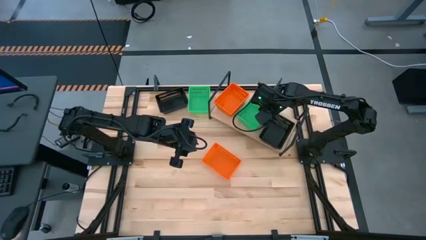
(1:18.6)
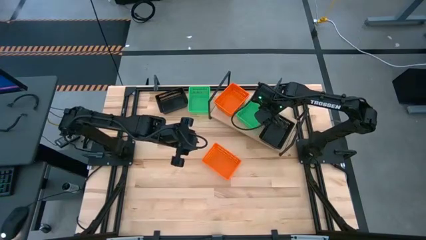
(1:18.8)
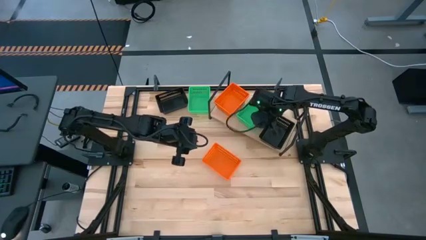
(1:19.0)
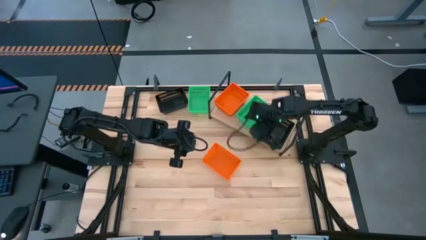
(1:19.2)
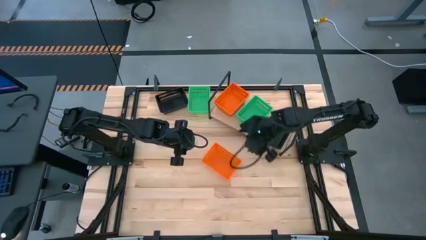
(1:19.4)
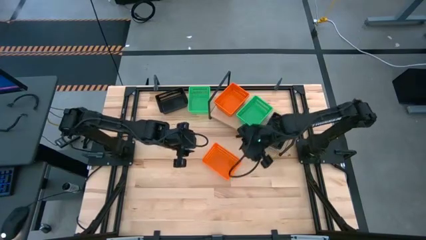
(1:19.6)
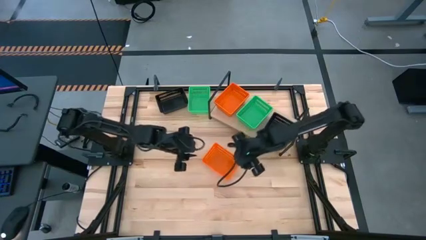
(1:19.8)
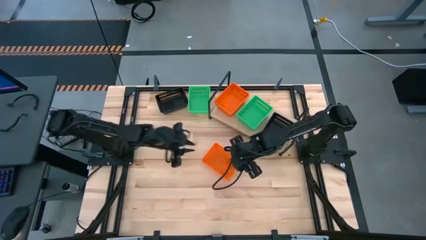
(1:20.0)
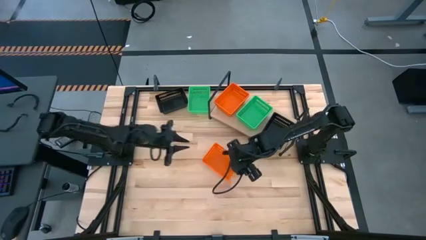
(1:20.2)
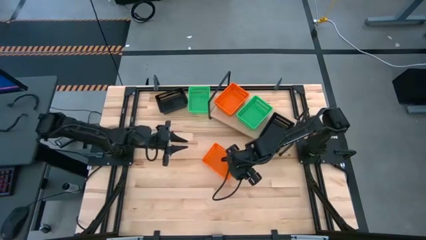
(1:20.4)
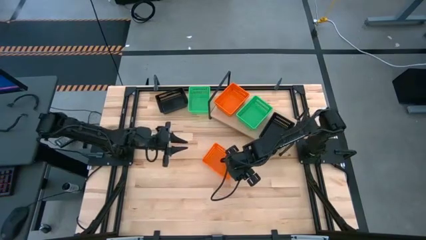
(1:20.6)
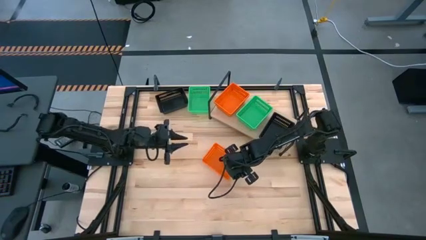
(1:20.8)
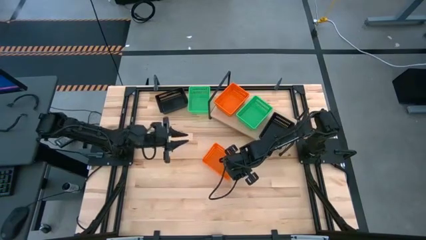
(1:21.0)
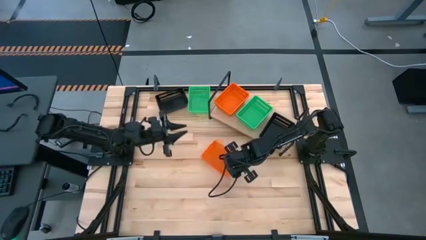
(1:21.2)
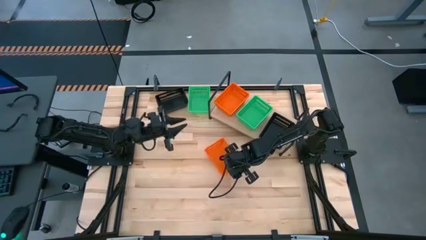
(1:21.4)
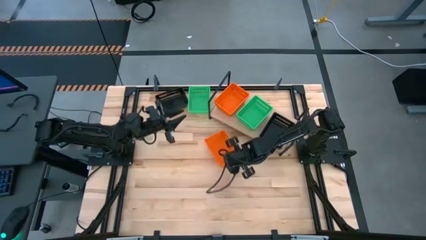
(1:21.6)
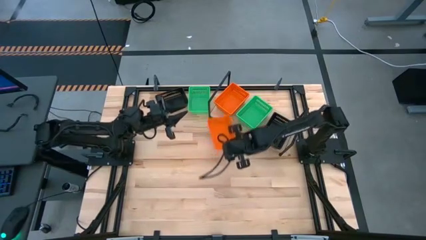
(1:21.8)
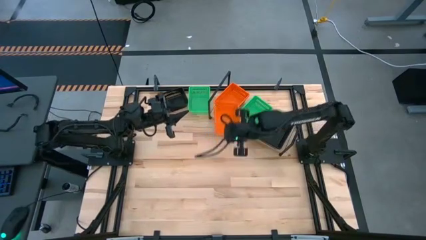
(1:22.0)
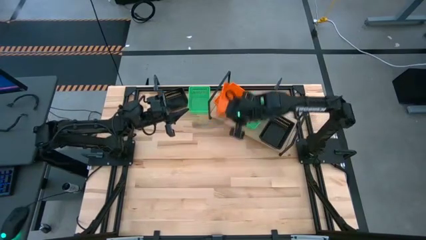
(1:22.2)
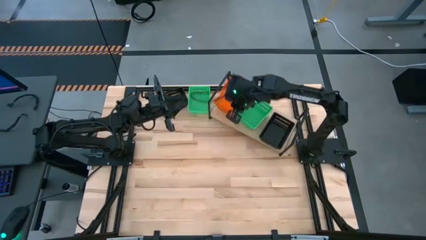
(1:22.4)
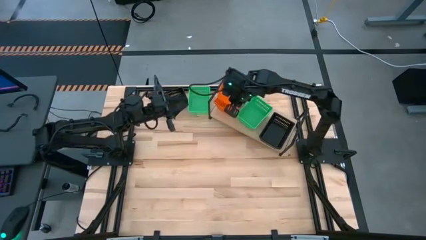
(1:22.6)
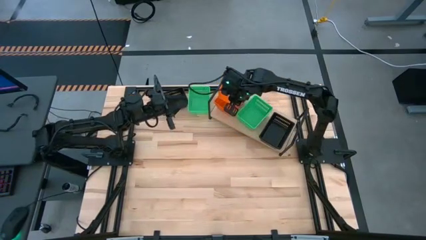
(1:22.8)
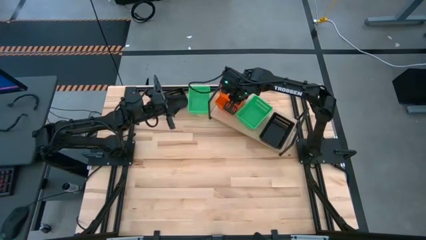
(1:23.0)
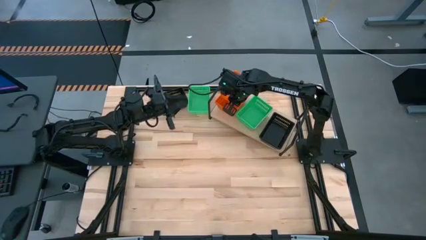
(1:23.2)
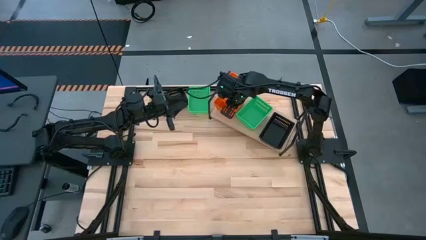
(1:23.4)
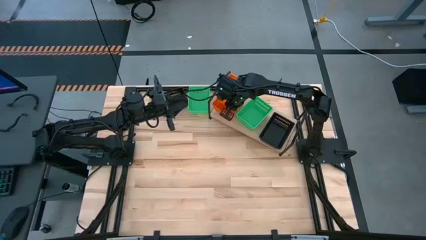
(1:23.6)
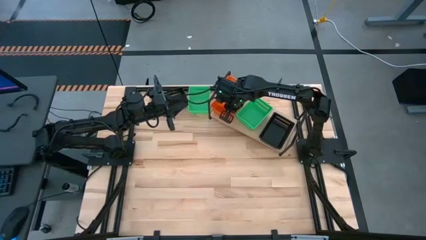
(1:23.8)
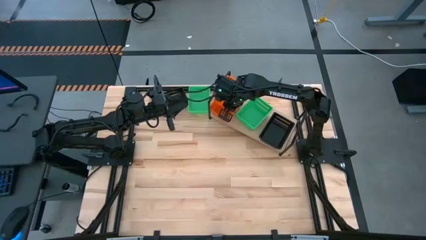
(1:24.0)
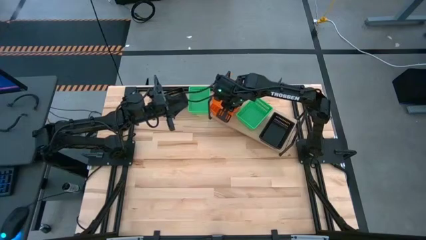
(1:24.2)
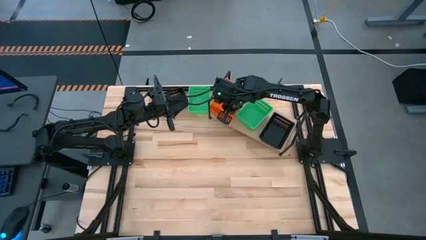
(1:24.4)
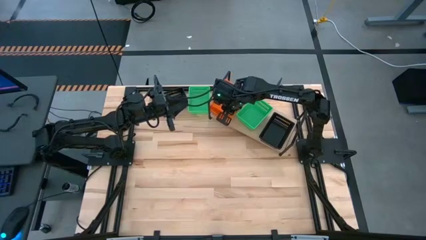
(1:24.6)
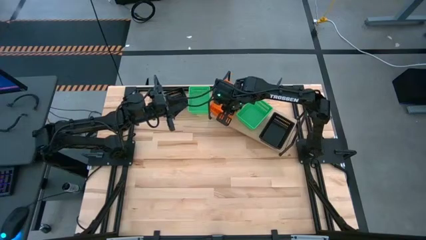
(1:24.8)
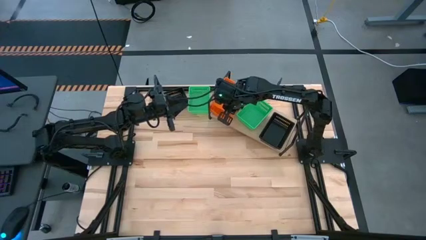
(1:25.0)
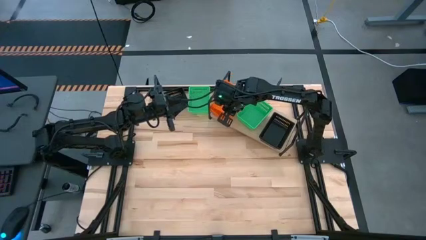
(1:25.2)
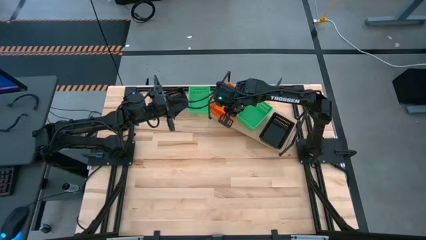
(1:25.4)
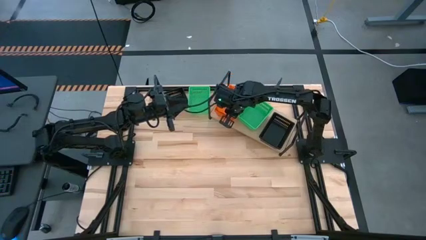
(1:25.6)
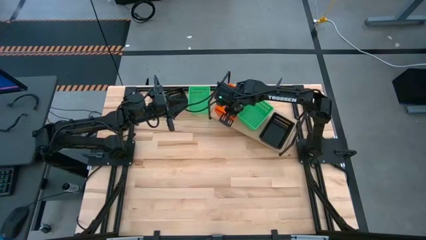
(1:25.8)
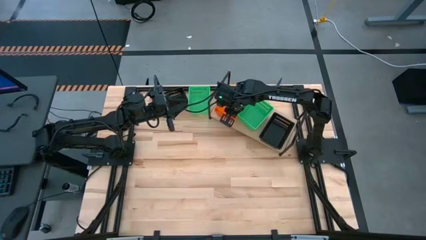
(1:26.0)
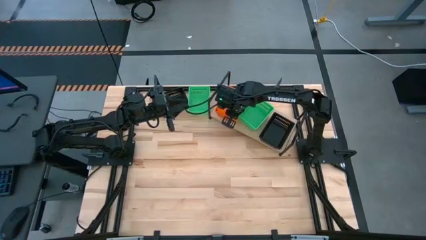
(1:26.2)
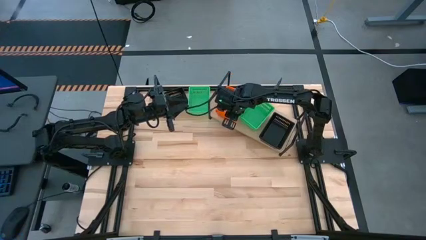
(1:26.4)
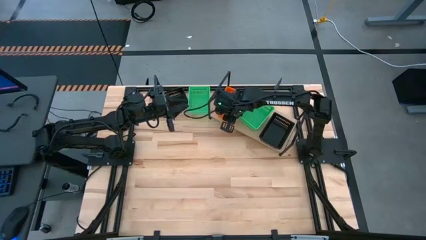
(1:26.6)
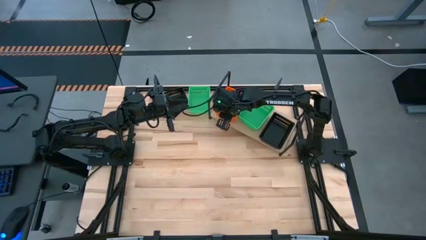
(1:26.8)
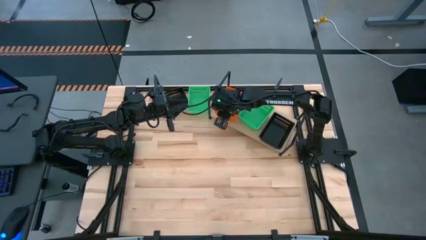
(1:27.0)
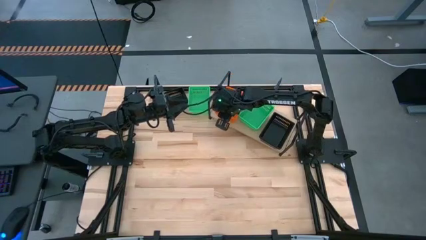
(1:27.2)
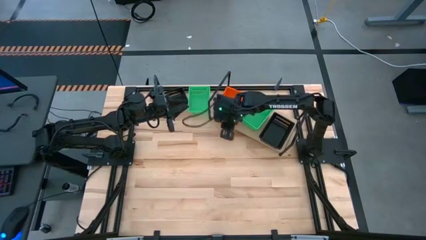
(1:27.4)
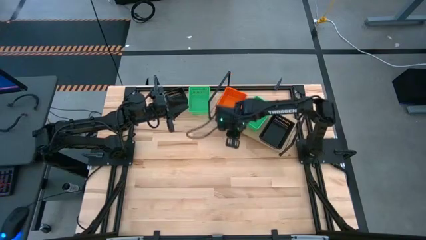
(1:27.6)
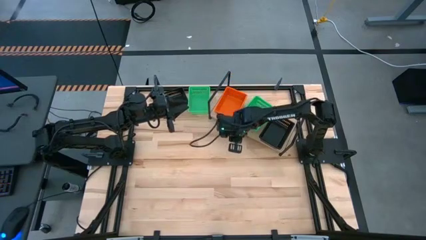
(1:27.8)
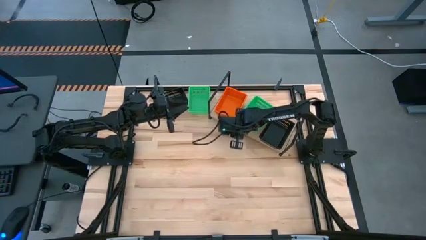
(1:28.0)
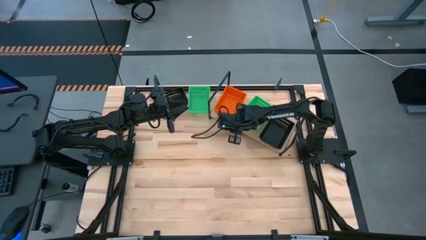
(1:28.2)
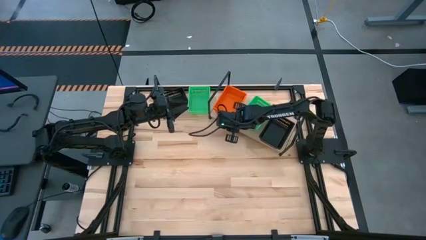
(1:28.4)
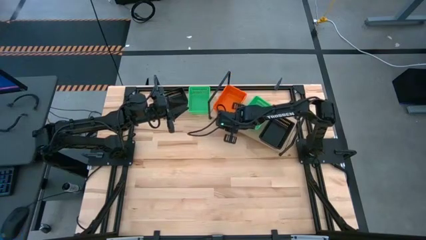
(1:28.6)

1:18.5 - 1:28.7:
Task: Stack baskets on shelf by color
Stack the orange basket on top of the orange basket on the shelf

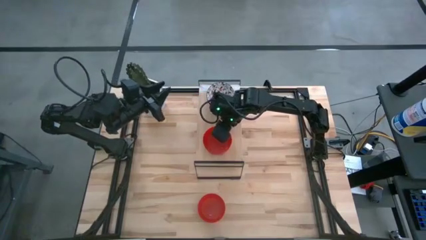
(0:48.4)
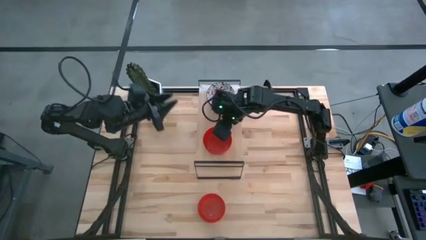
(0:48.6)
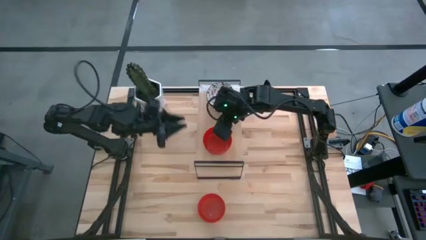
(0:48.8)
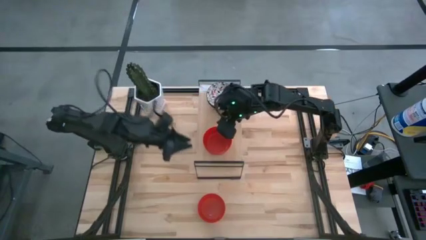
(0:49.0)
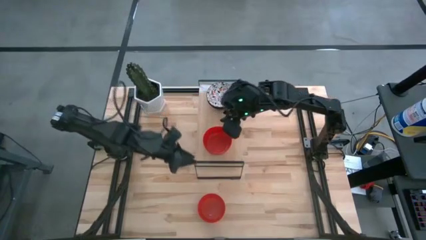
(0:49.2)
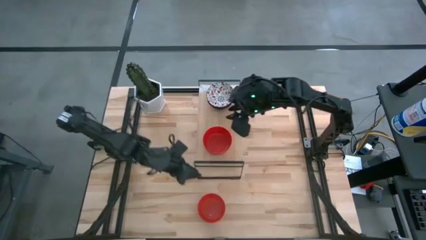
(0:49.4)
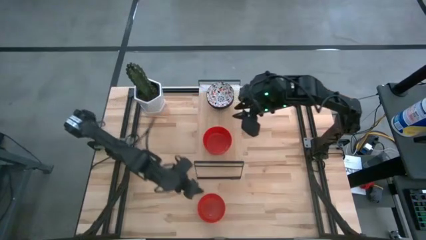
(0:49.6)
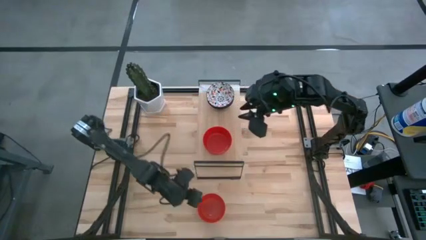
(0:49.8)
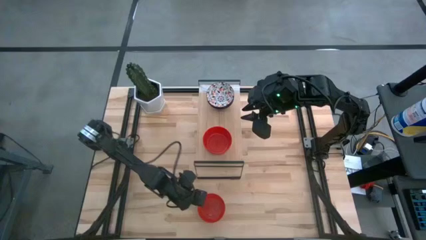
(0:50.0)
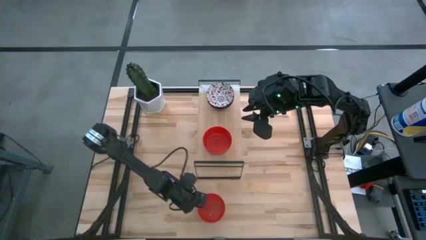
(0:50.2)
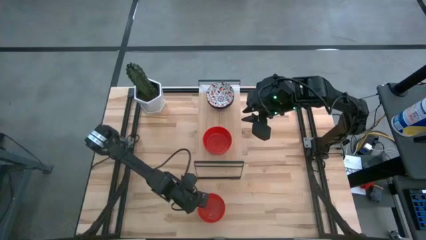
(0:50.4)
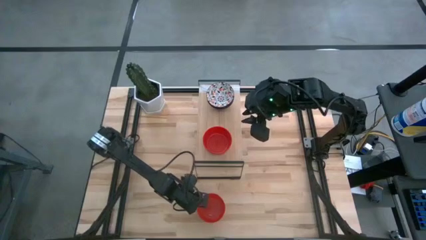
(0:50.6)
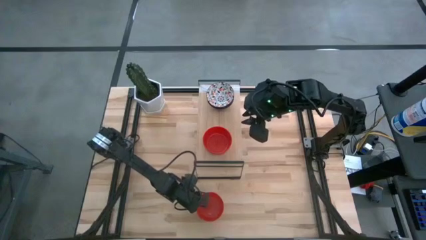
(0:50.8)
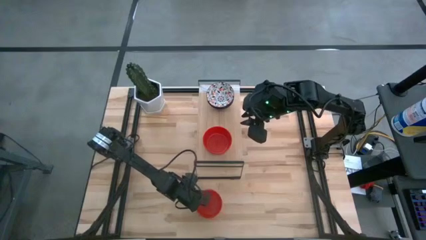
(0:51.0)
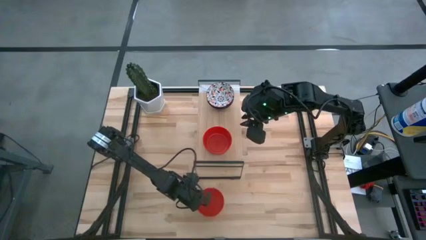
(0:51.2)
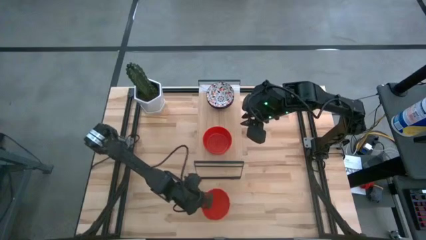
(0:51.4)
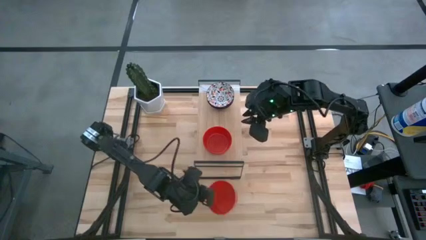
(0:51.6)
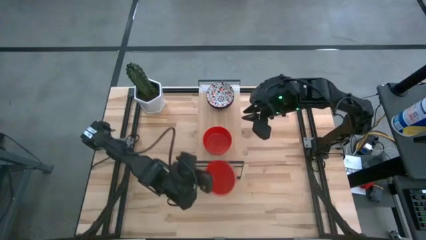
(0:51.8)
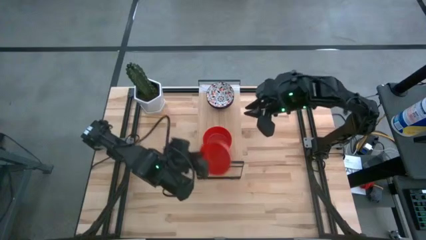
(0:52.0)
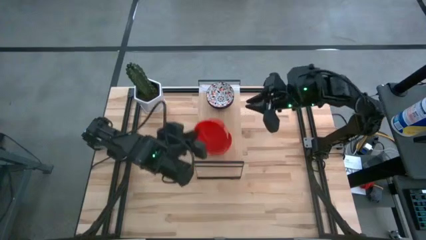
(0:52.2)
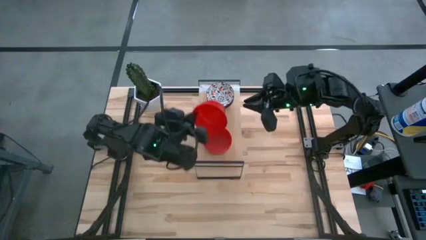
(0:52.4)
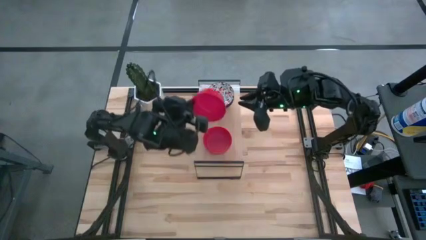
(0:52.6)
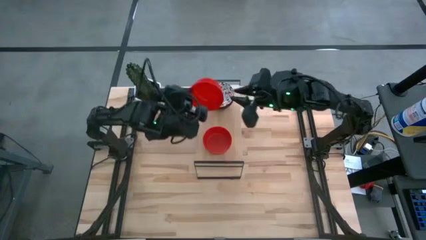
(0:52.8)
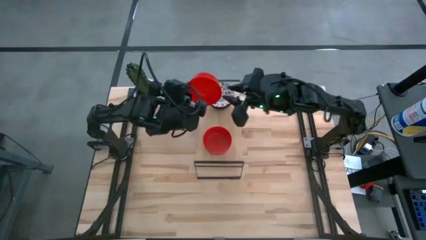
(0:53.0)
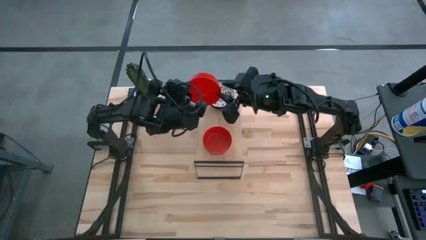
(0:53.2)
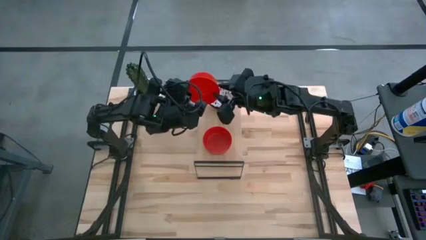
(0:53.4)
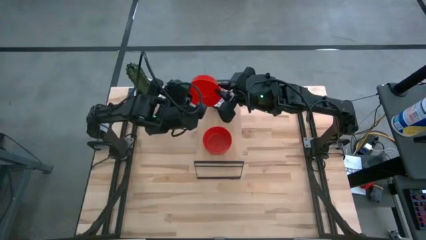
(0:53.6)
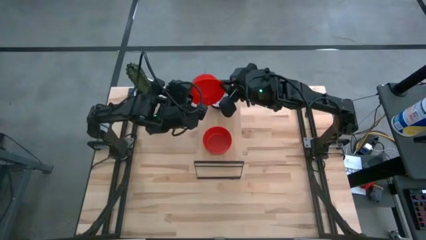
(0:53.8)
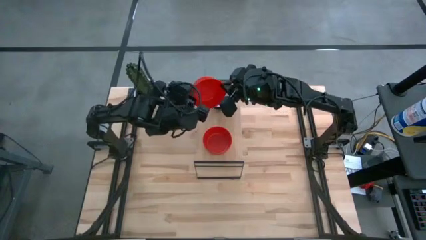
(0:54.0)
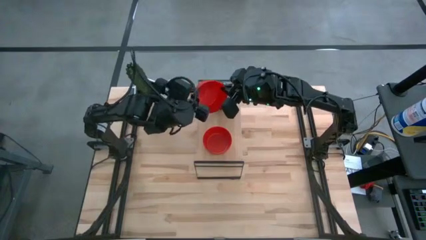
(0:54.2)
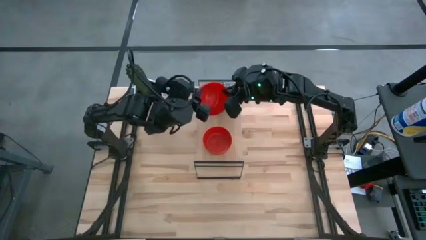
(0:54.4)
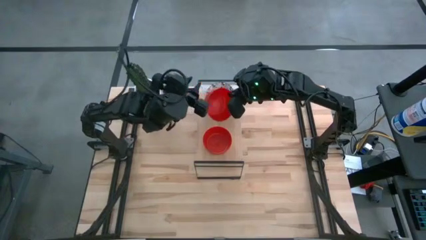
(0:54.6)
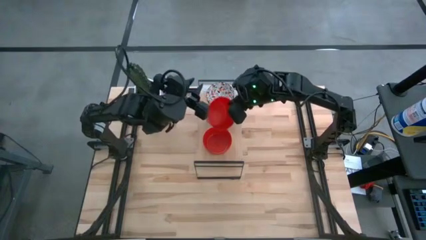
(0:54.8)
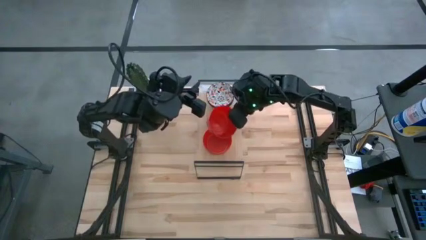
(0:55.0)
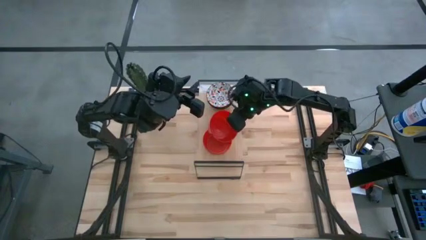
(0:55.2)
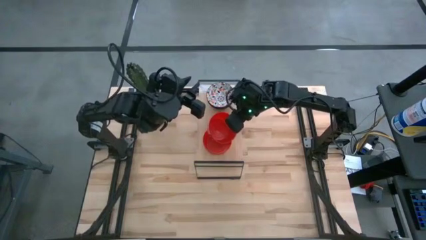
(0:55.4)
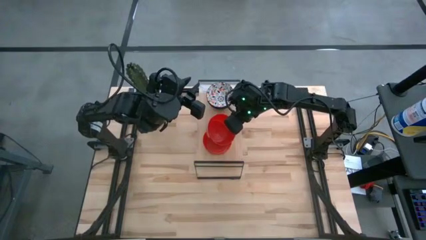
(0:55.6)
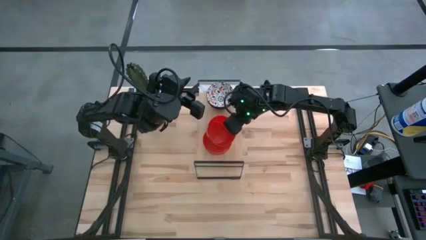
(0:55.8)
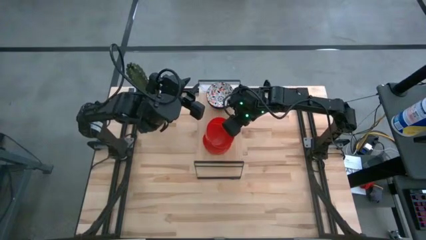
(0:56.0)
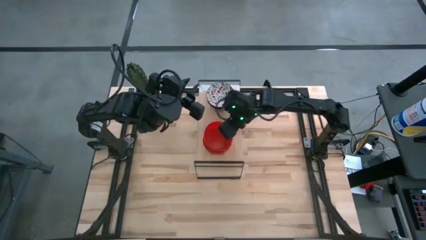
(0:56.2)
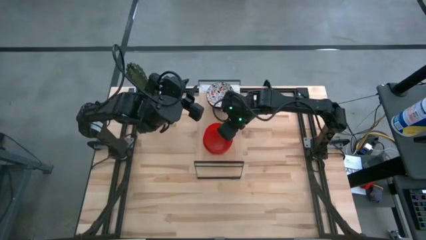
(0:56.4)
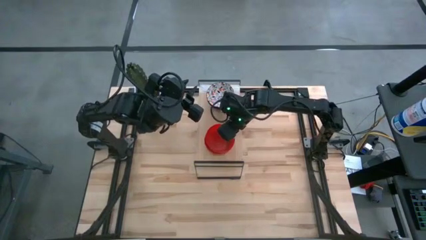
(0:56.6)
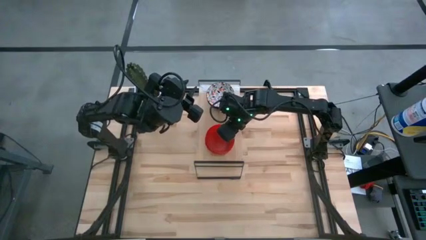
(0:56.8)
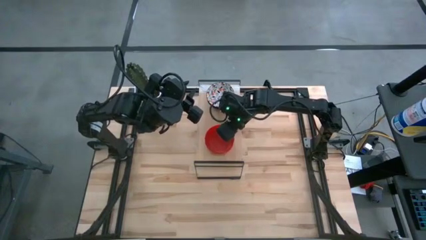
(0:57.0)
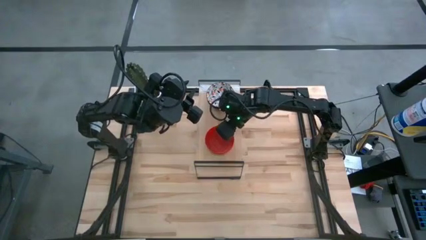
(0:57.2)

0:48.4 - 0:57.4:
Task: Pick & Place Mini bowls
Stack the red bowl on top of the other red bowls on the shelf
